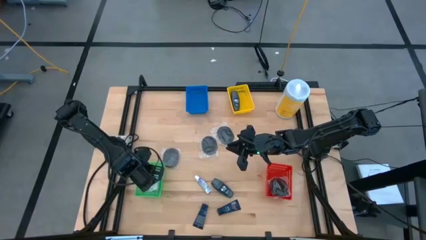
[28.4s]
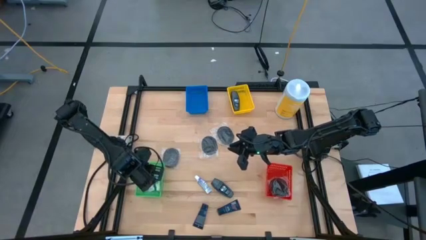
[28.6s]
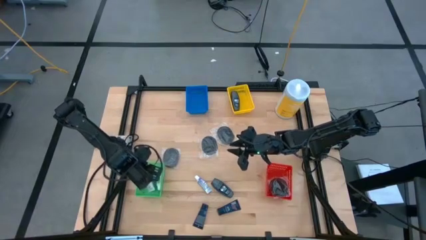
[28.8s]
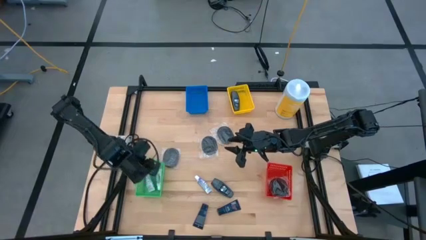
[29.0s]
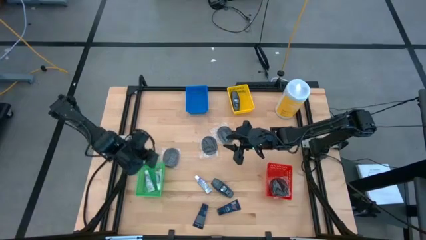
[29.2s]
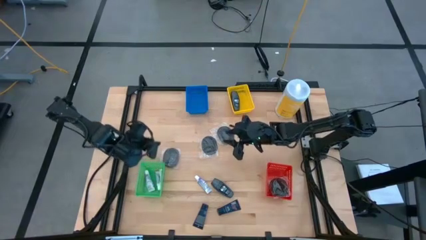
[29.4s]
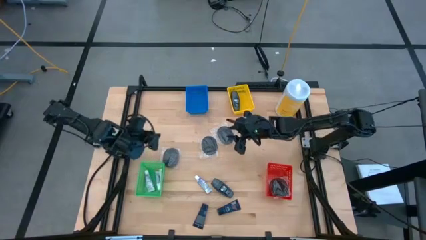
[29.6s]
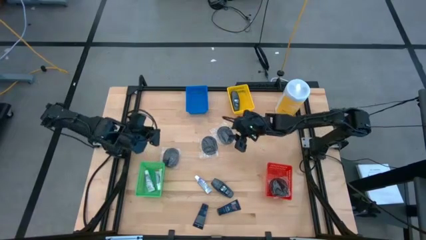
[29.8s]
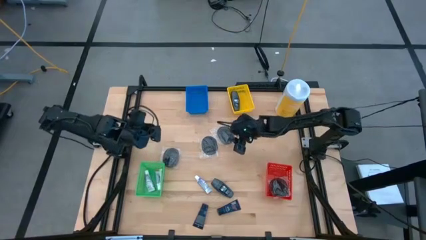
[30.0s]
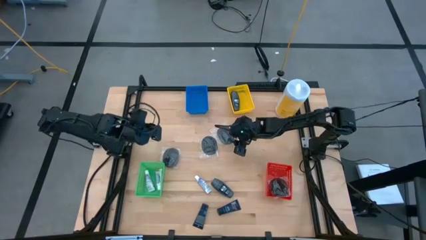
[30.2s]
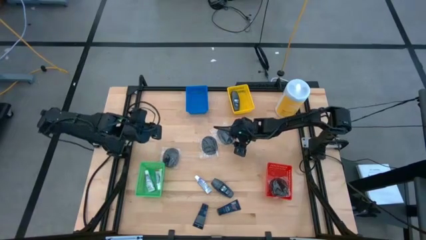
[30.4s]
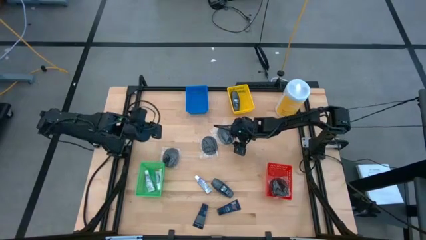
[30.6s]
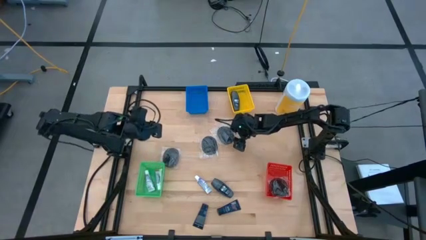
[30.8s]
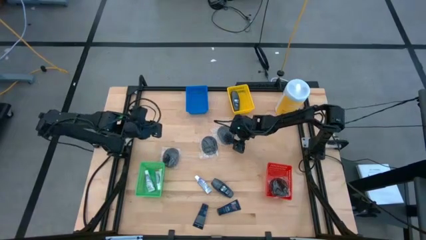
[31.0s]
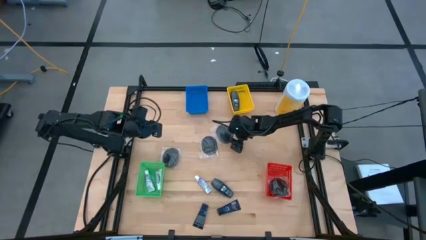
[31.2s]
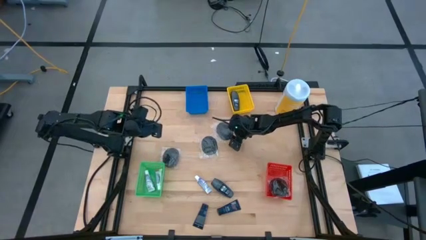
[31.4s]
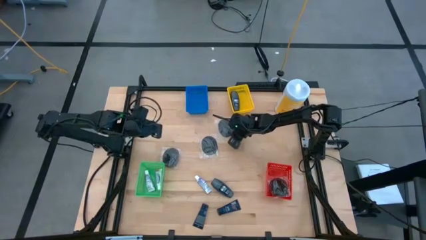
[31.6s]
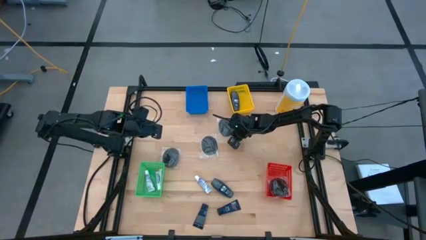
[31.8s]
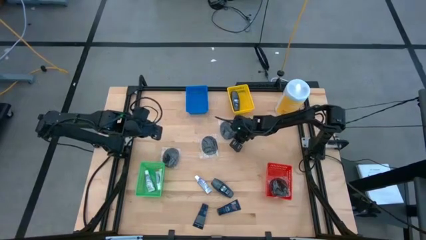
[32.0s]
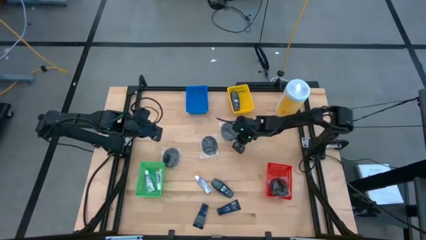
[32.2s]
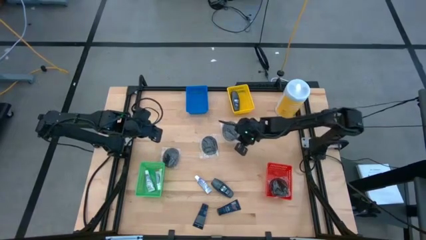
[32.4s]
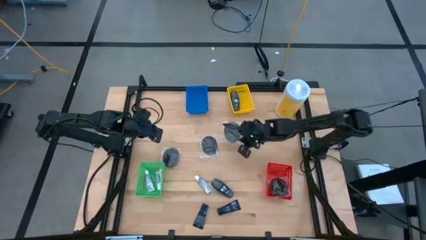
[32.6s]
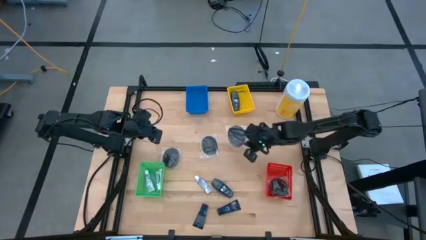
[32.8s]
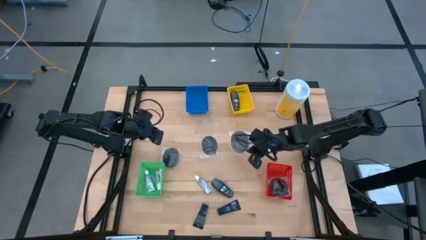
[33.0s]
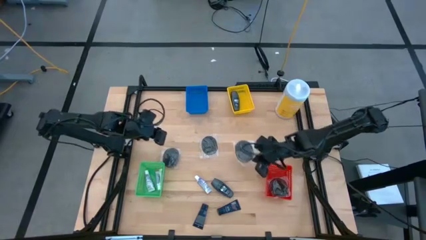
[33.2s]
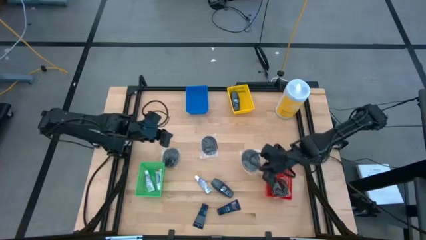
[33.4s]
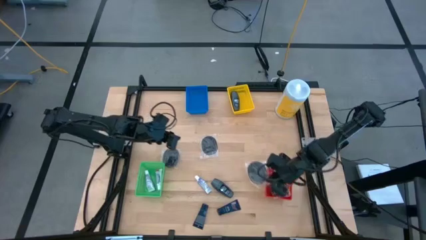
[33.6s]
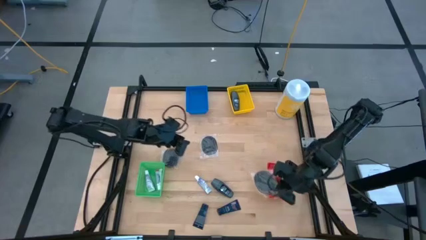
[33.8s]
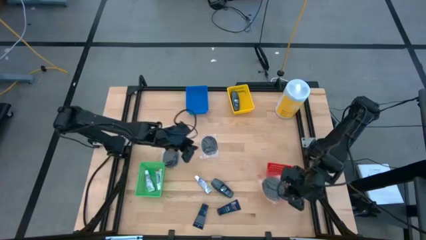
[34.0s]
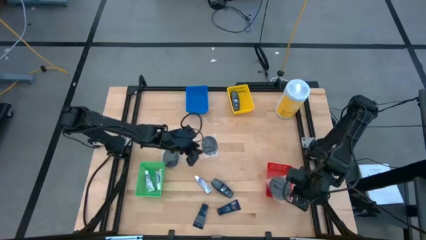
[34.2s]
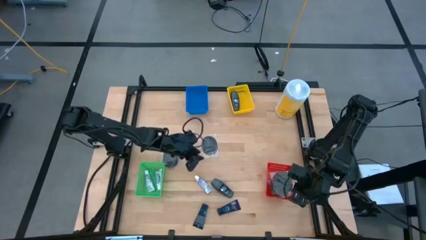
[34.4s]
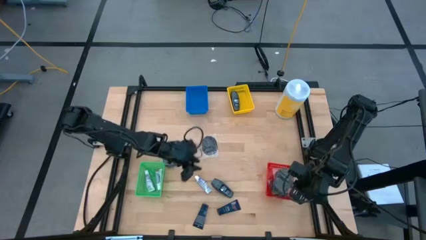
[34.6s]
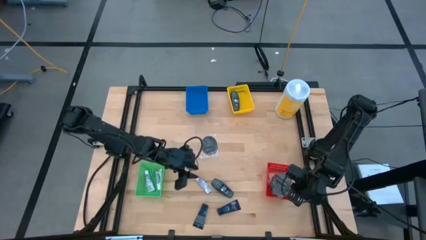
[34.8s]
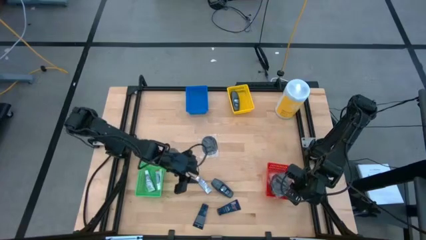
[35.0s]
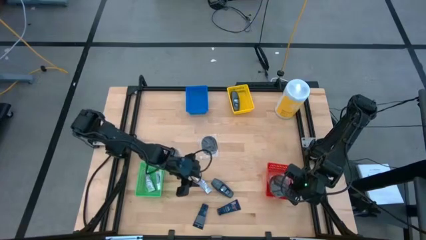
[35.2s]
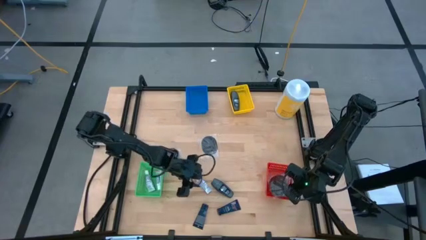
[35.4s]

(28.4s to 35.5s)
Task: Pick & Place Travel size toiletries
Put the black hairbrush into the red bin

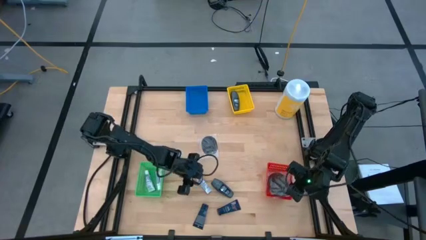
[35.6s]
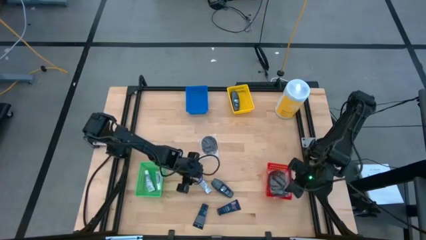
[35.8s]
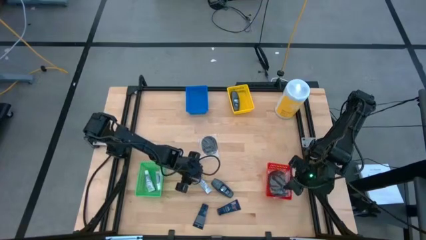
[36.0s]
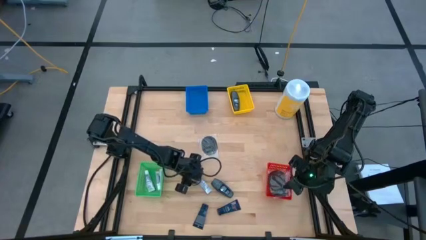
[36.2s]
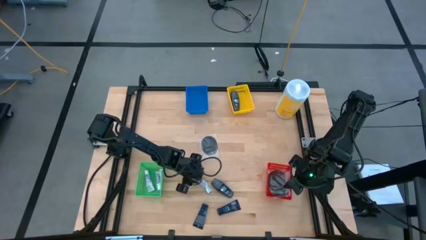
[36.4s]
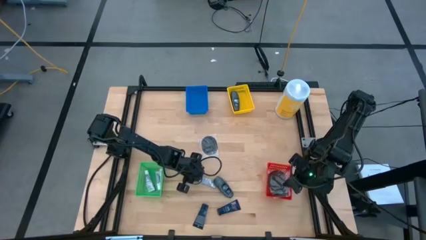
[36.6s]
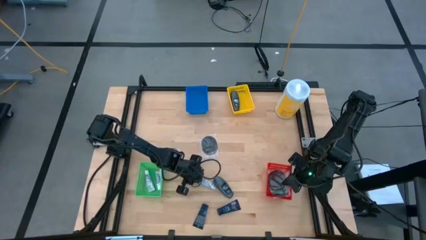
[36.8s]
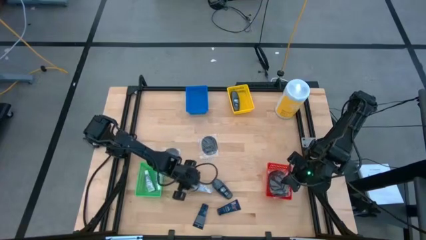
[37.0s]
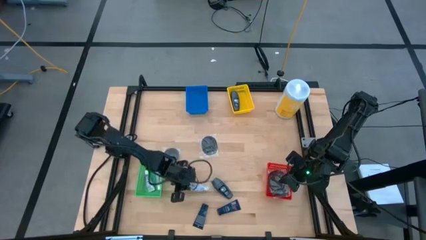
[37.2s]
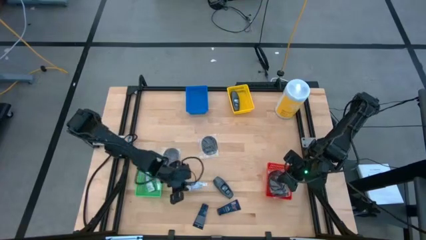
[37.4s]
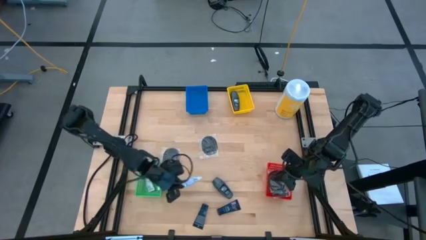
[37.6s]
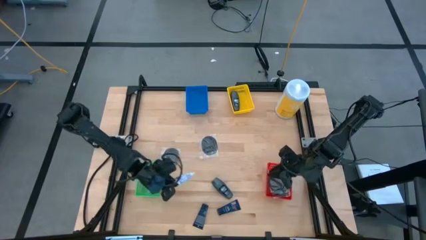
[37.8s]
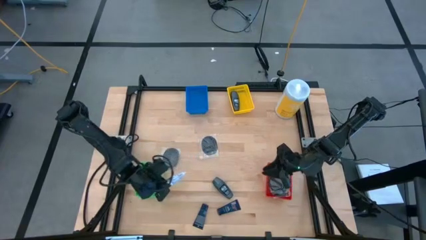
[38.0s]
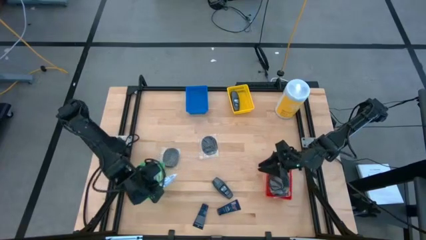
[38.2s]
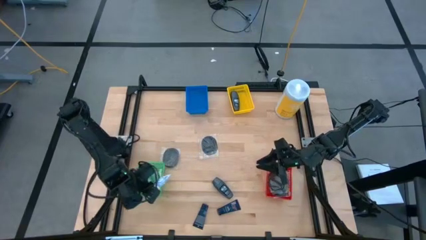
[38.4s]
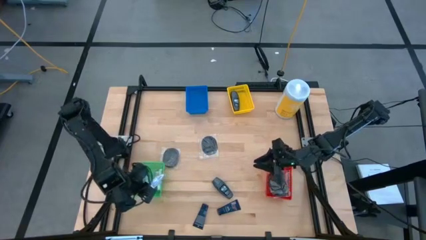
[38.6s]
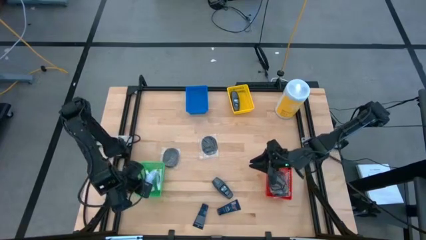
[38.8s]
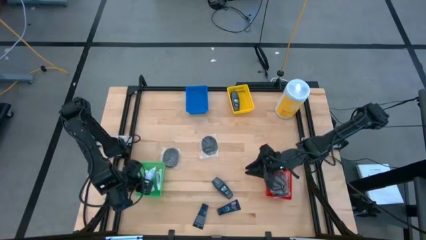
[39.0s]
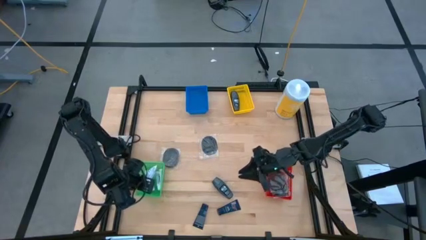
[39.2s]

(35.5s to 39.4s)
Put the white toothpaste into the green bin

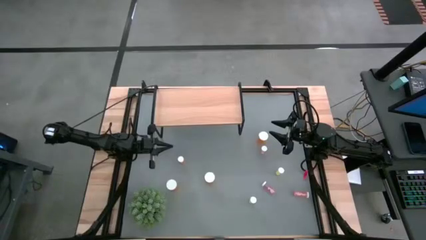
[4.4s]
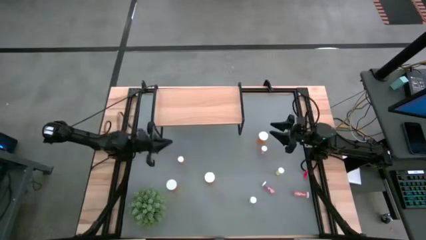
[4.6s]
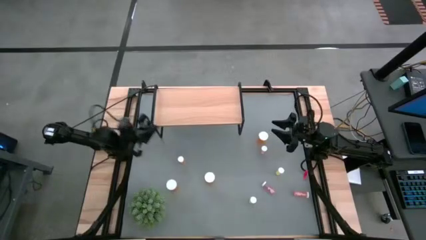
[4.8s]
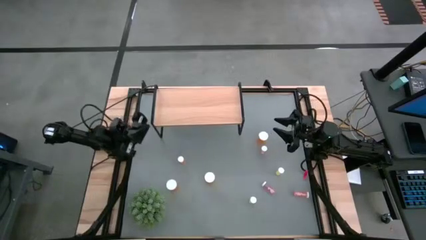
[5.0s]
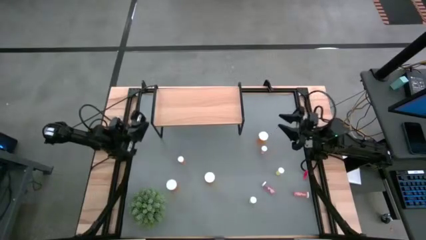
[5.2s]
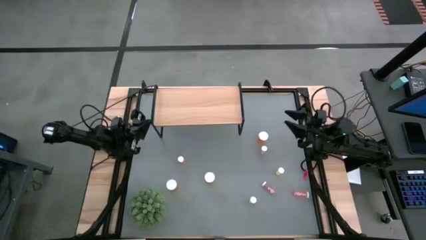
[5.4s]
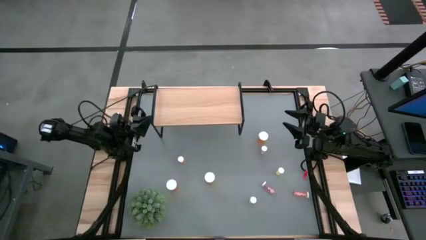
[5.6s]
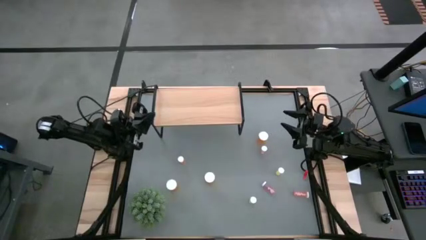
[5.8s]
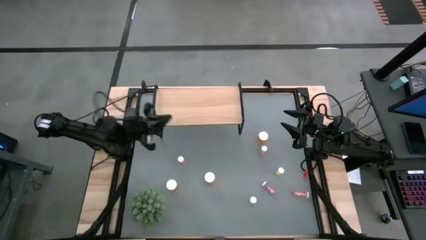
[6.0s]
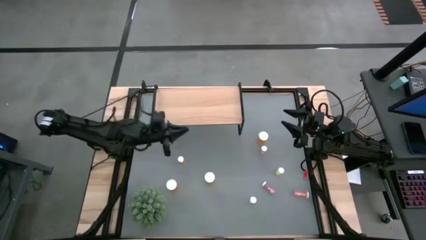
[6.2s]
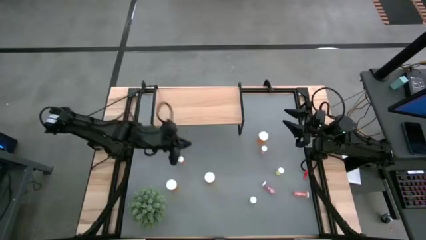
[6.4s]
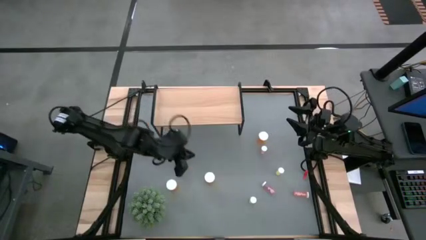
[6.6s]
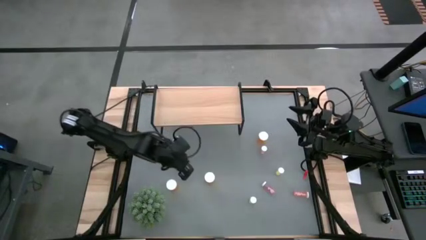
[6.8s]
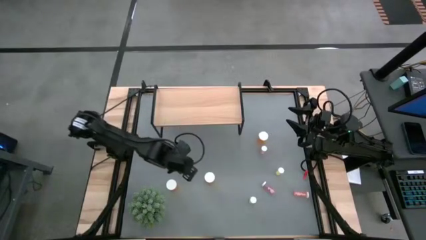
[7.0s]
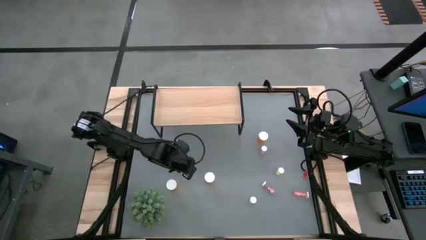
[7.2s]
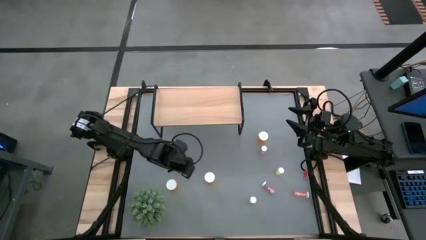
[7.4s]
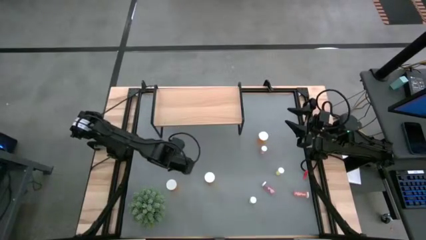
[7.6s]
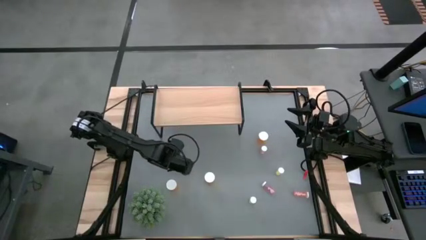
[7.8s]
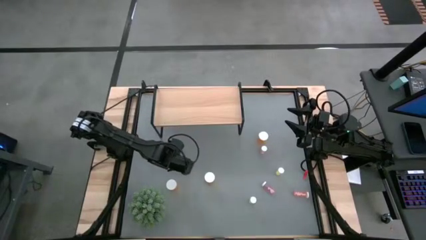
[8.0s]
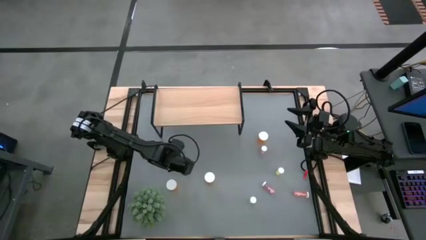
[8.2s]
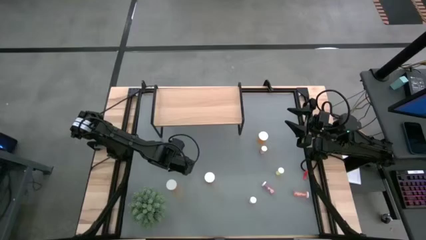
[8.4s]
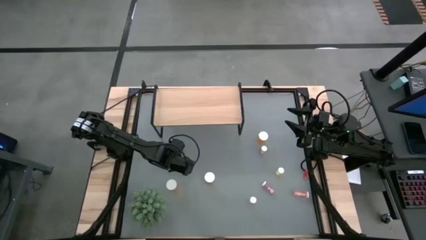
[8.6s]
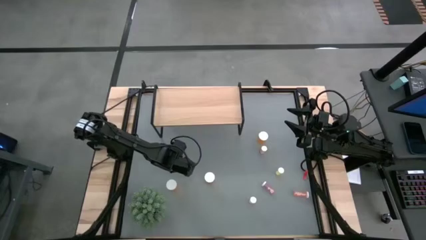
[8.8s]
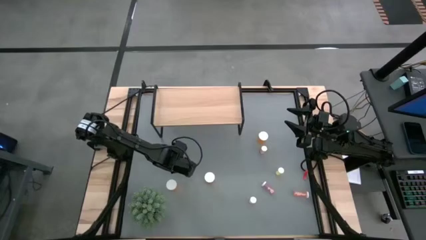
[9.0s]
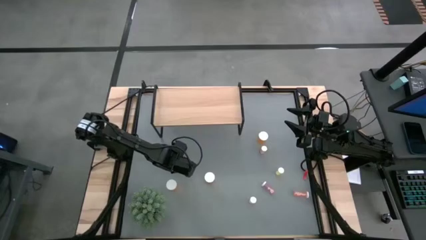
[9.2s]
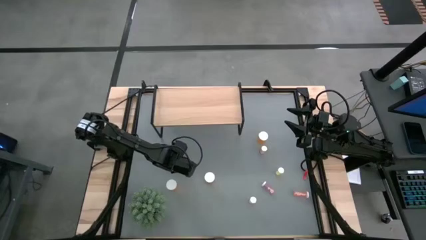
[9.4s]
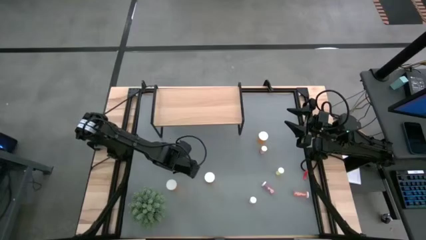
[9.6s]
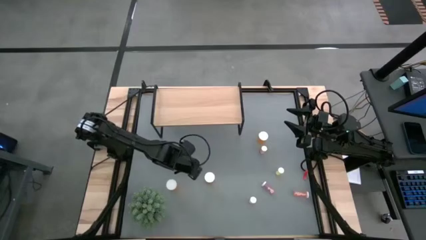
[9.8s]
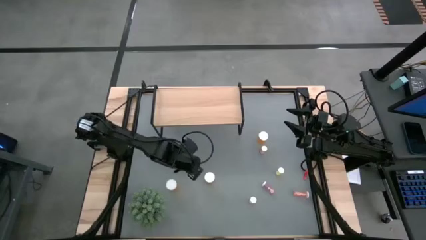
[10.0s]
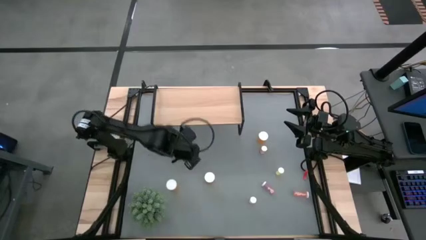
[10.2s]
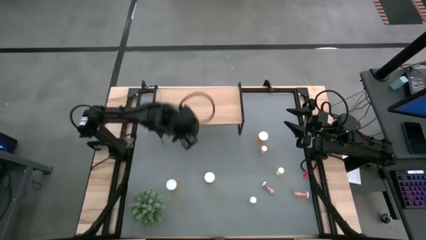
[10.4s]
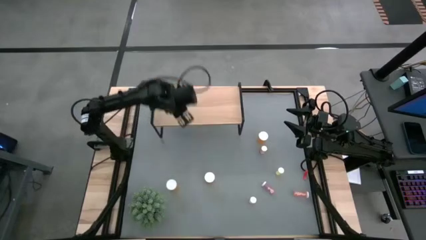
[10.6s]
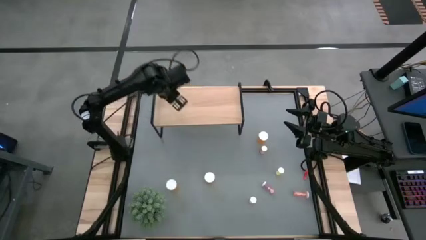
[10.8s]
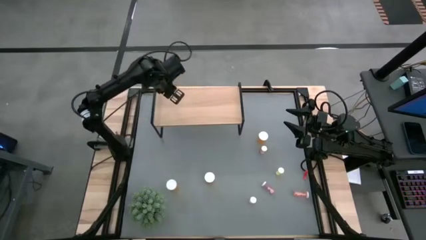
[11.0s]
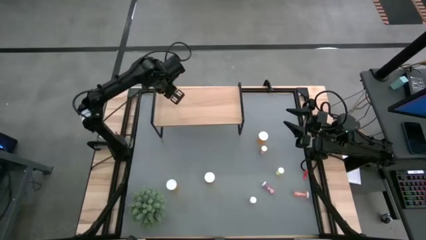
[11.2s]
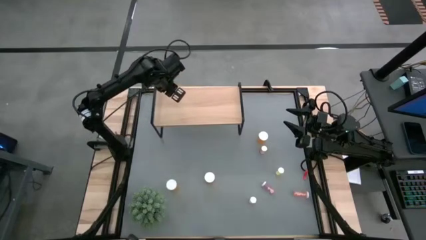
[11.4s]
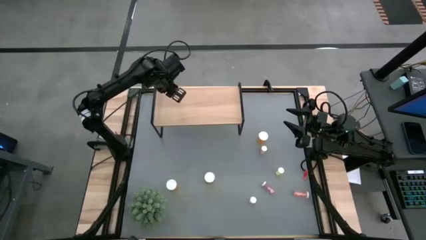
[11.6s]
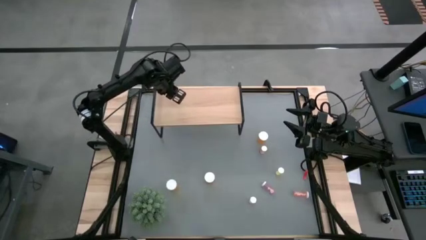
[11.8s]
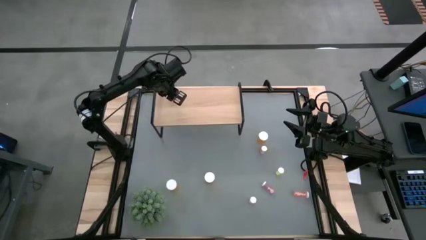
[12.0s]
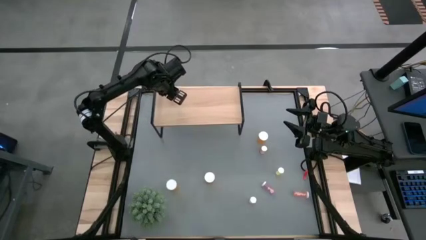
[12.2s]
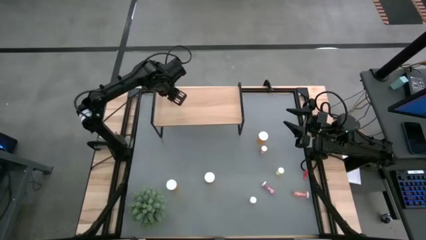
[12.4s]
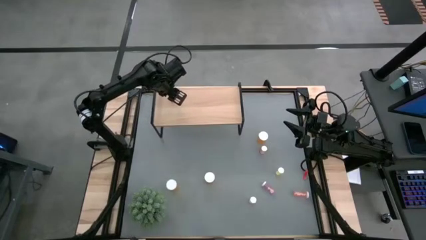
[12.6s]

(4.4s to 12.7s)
Task: Pick and place medicine bottles onto shelf by color
Put the top yellow pill bottle on the shelf
